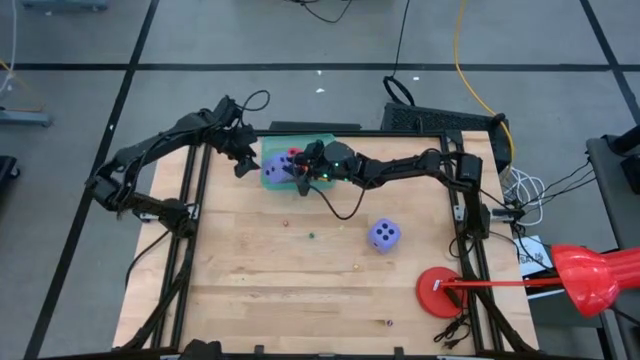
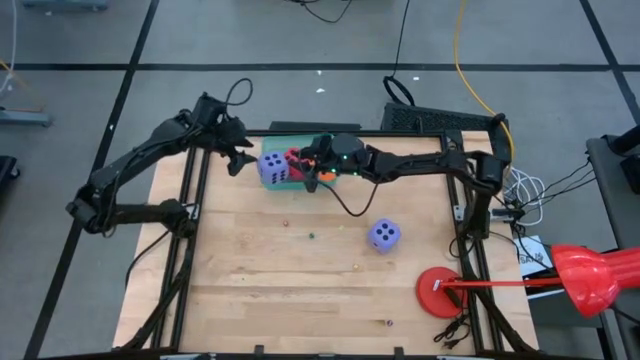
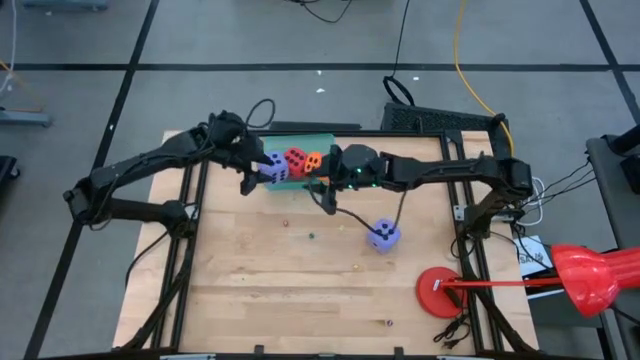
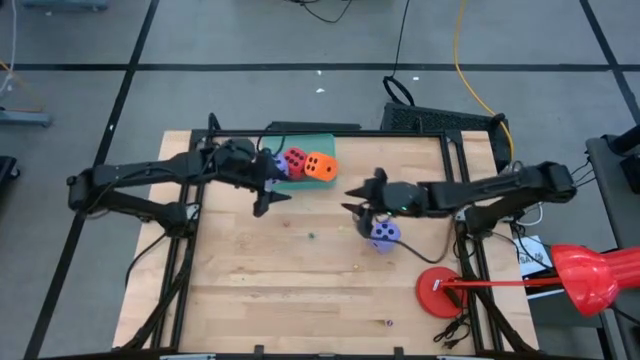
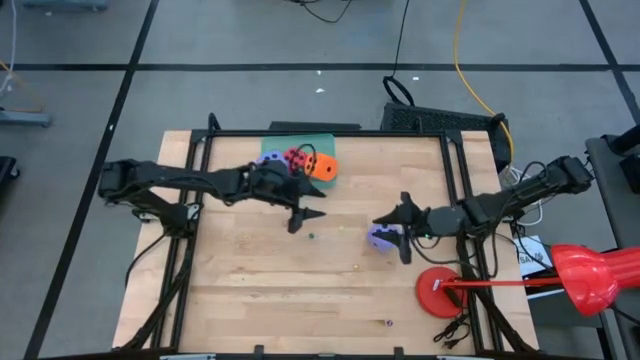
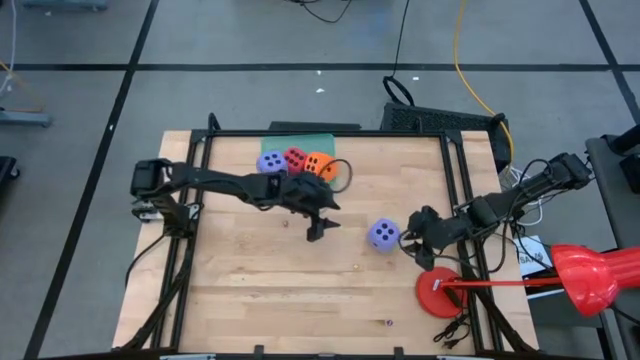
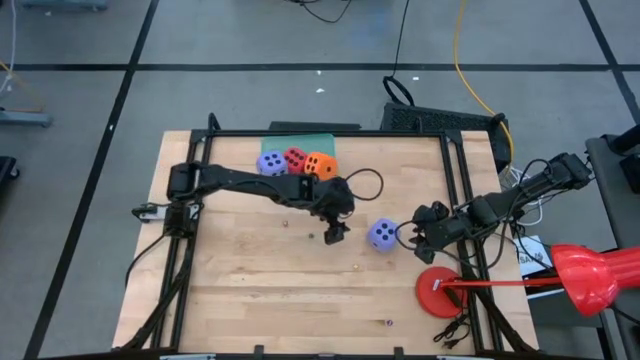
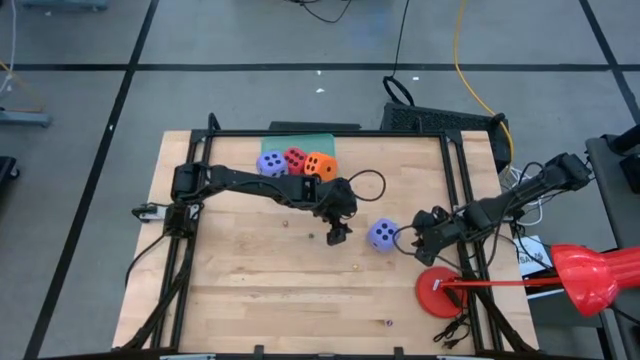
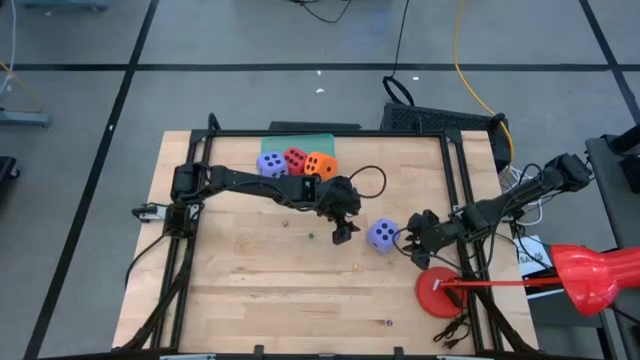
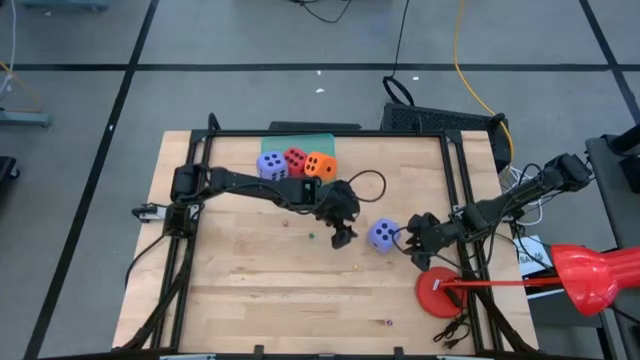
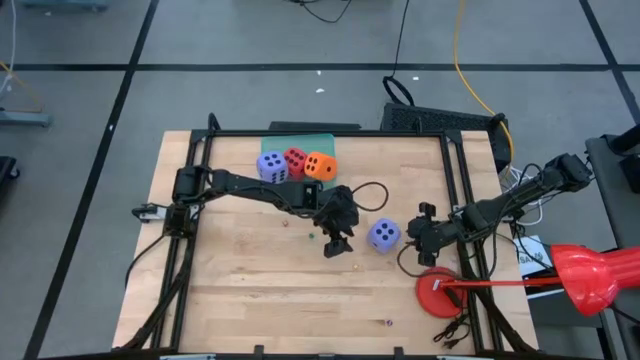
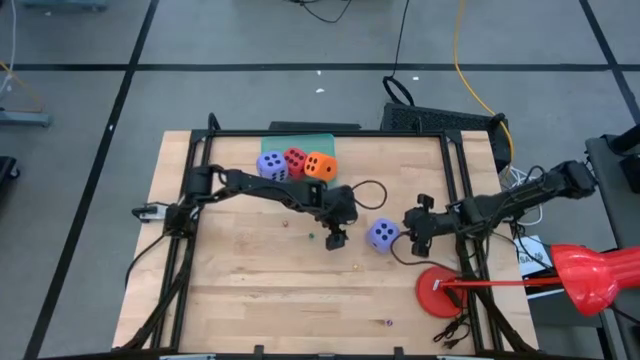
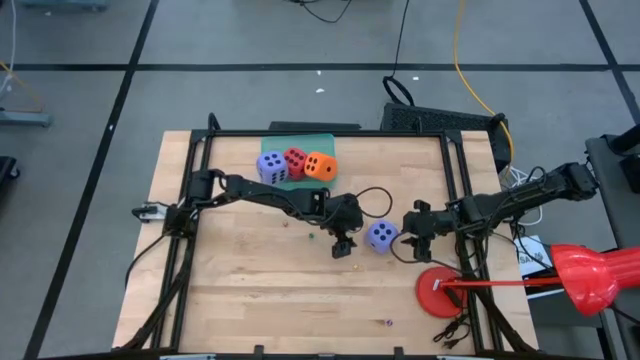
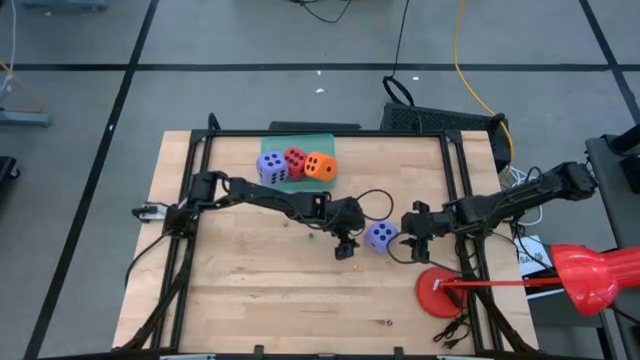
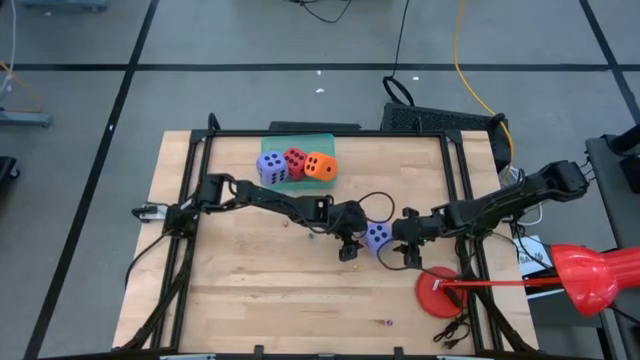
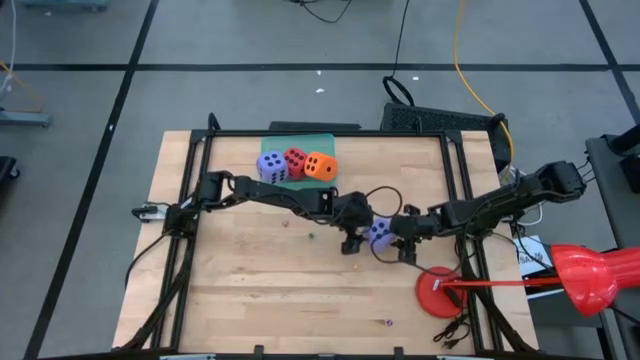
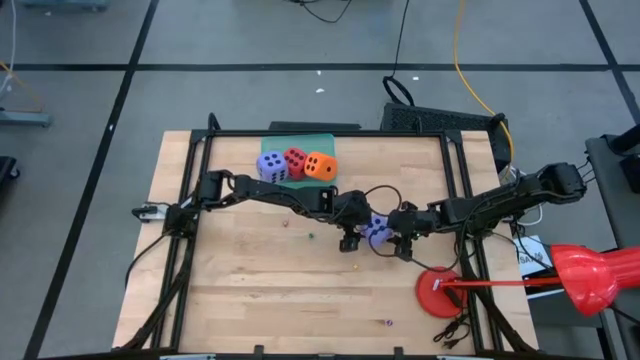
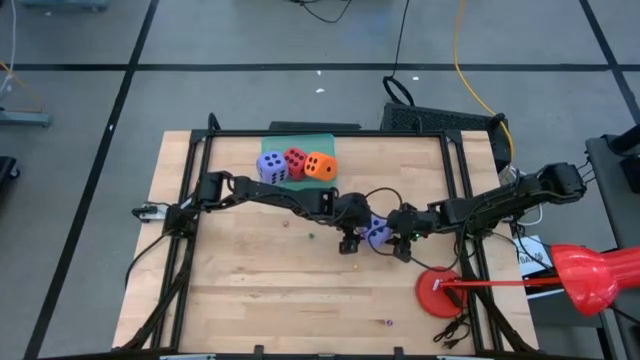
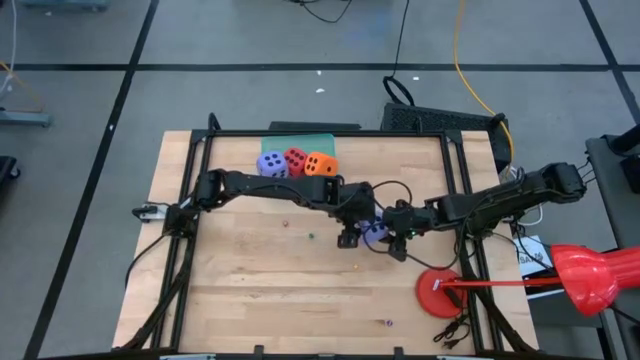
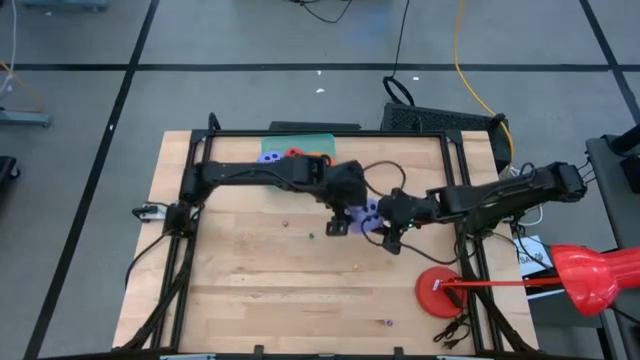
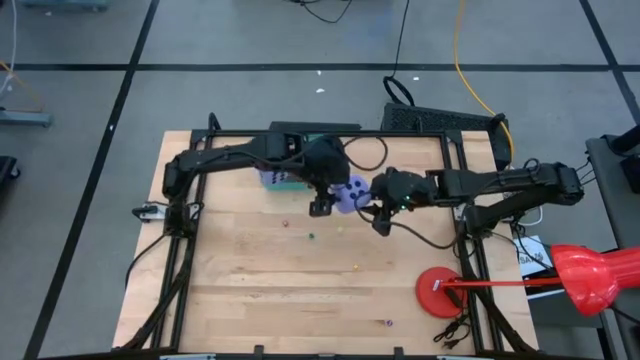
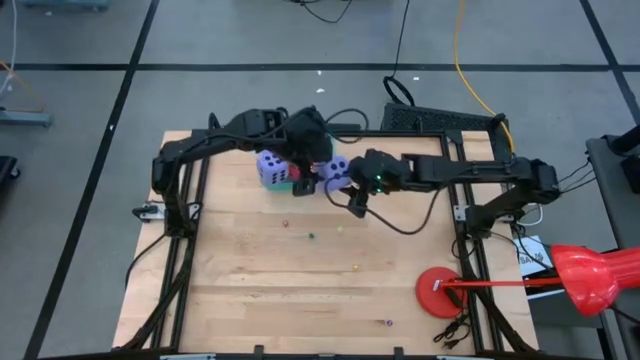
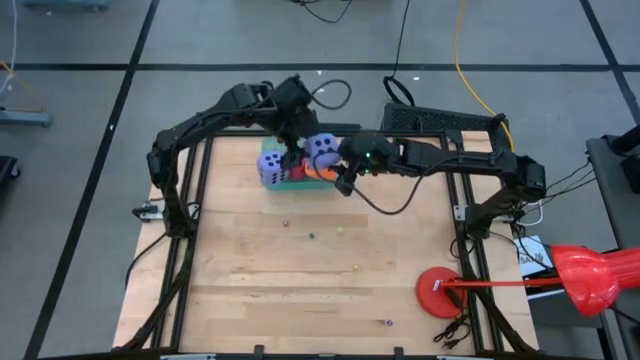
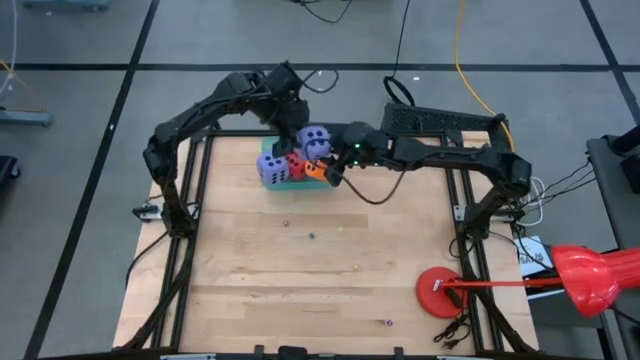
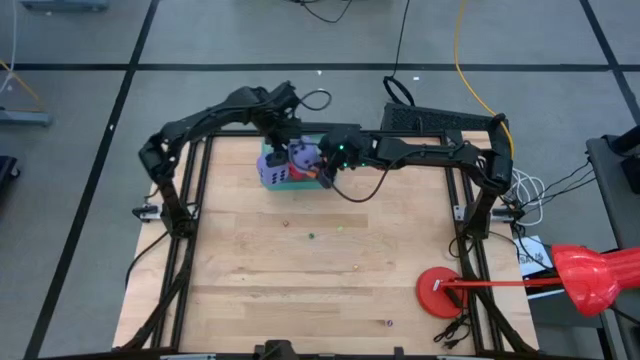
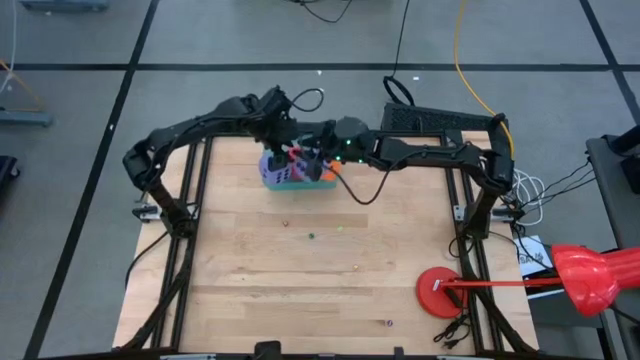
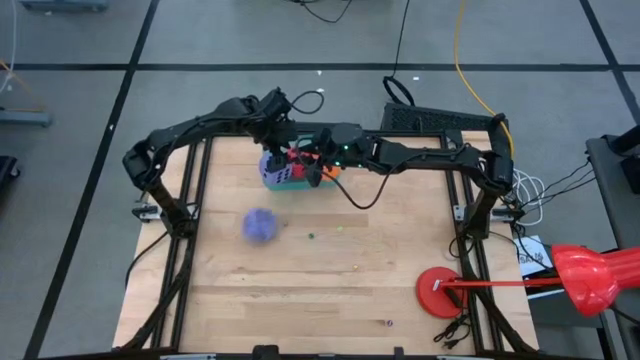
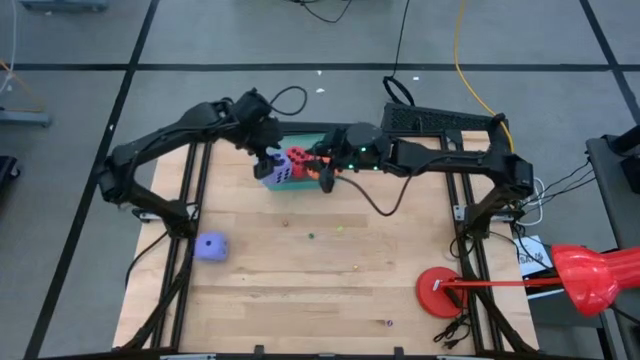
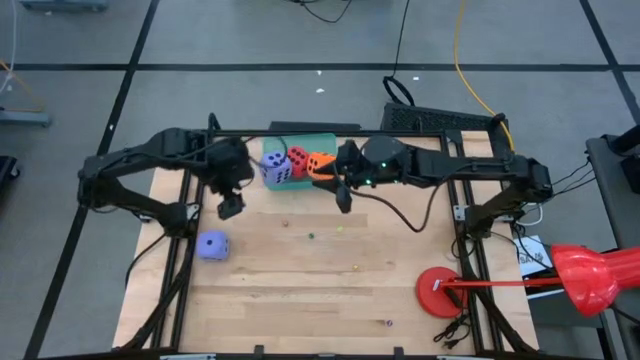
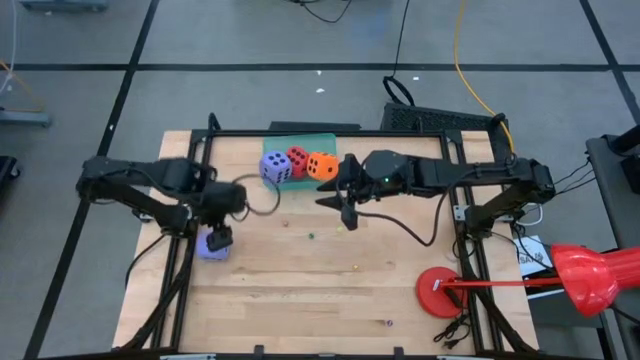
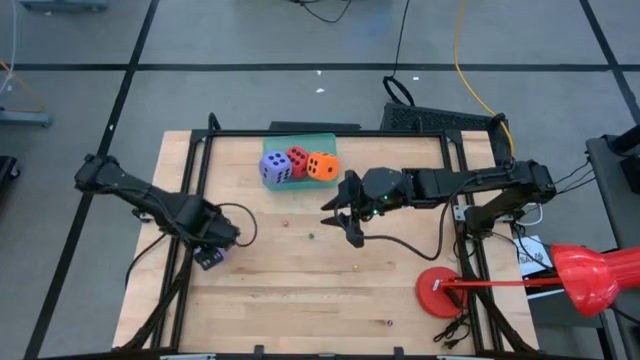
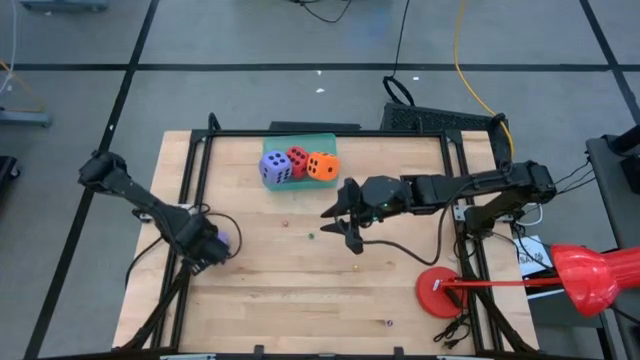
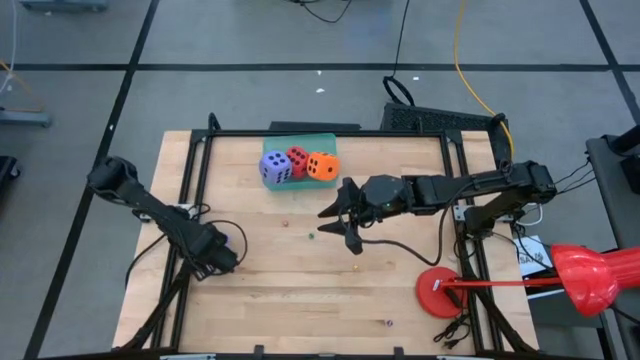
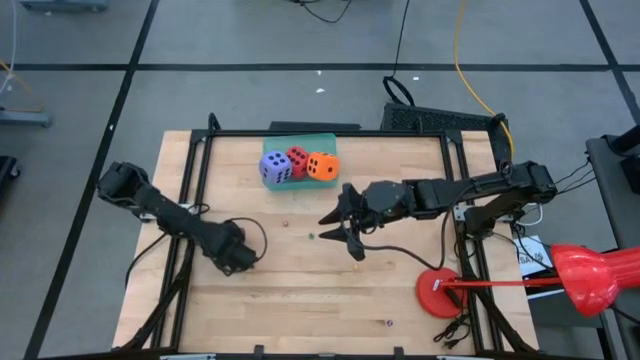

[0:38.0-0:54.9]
Task: Pick & Place Dice
Put the large purple dice into the green bin

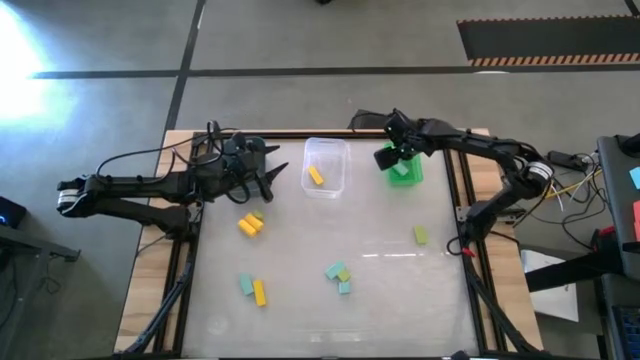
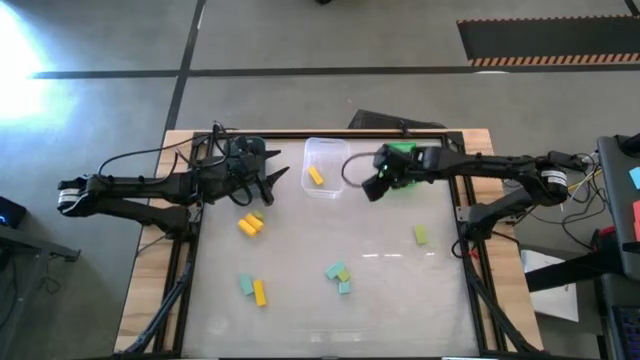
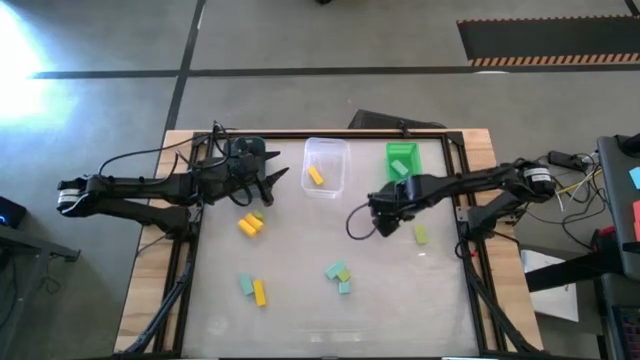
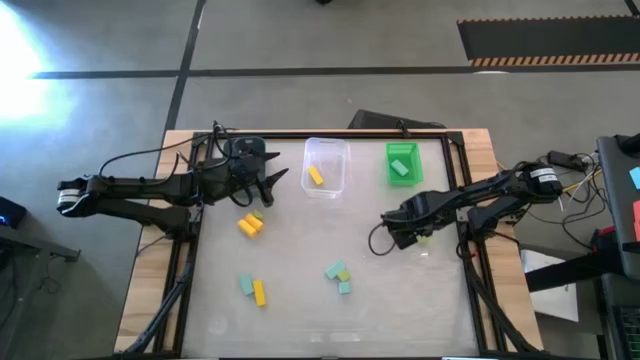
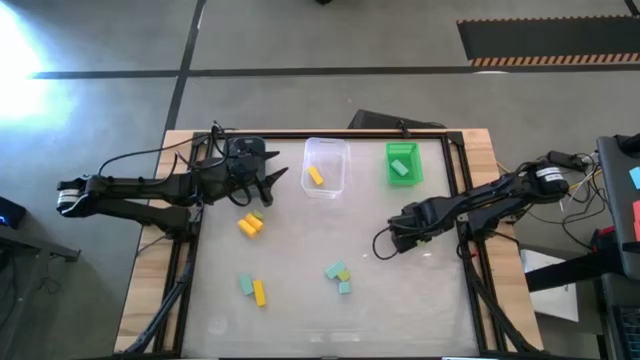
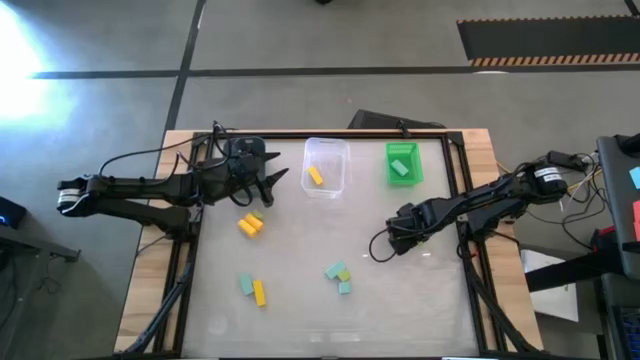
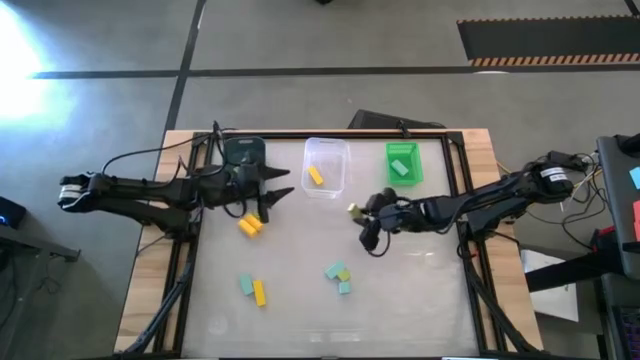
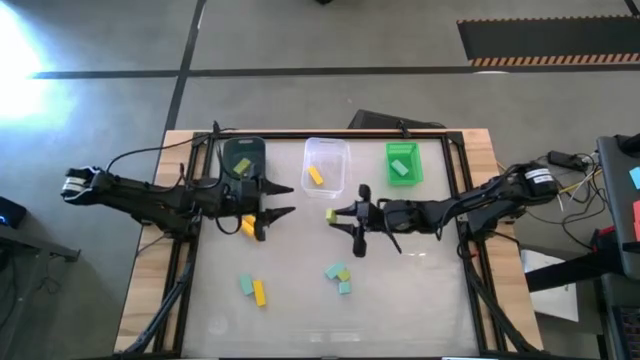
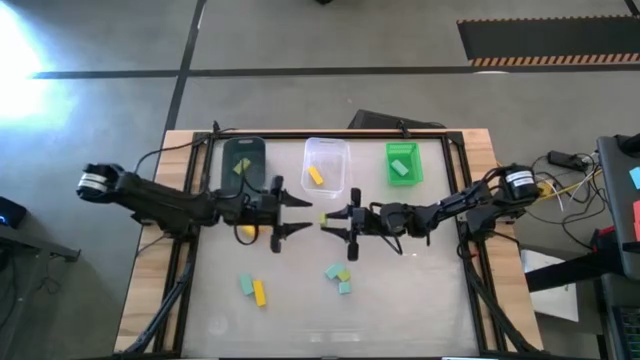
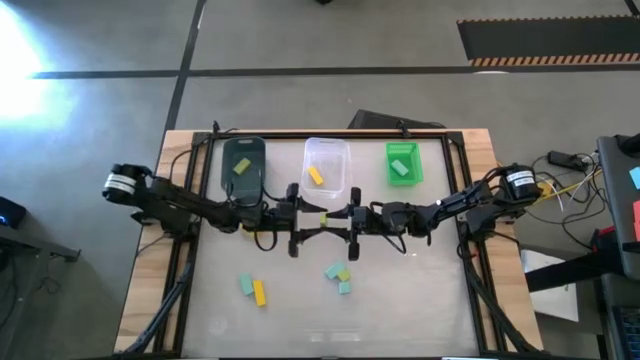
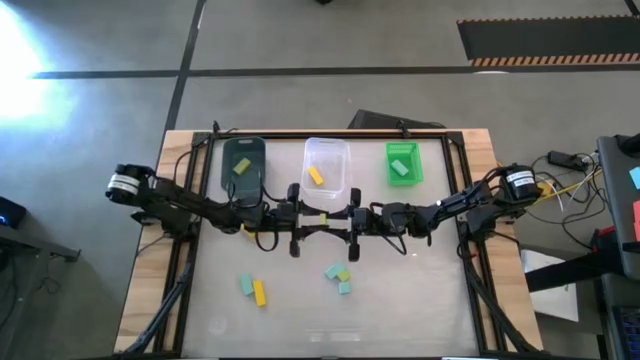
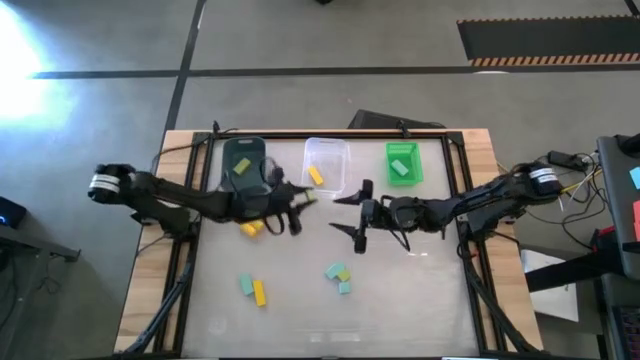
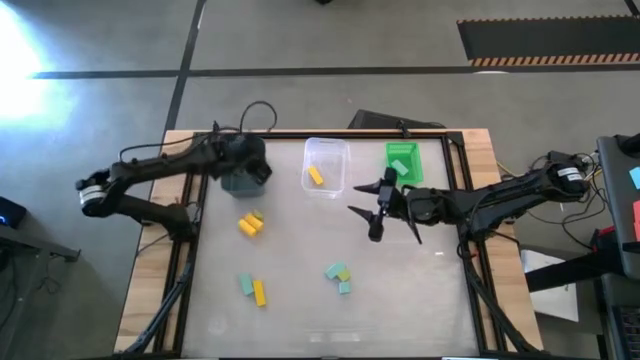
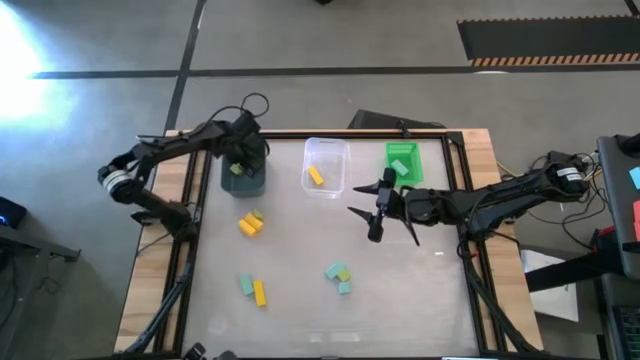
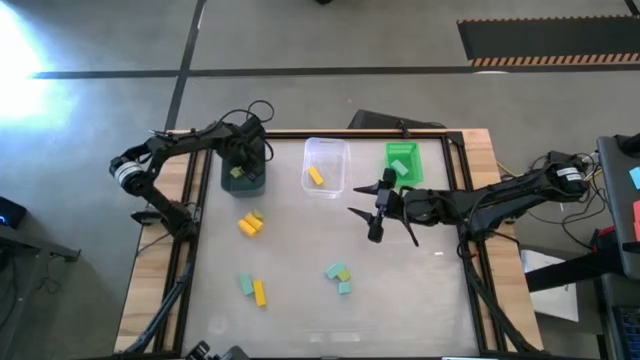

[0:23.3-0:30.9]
Task: Sort & place blocks by color
Put the green block into the blue bin
